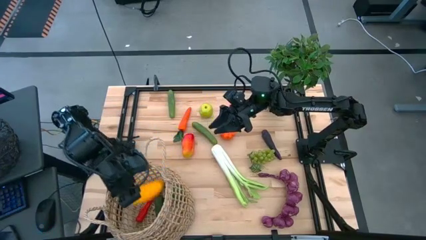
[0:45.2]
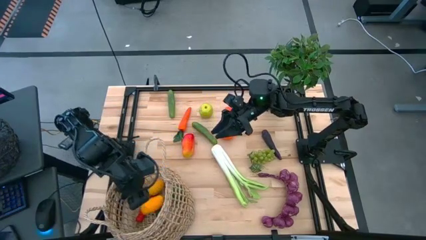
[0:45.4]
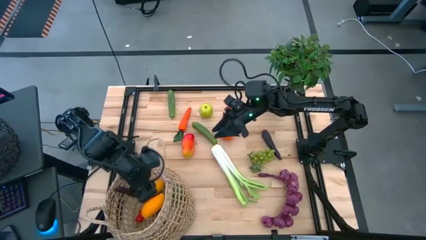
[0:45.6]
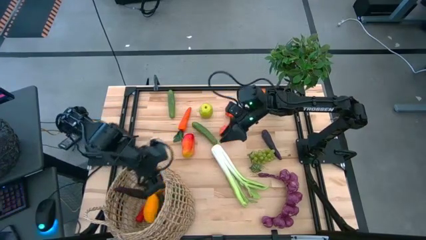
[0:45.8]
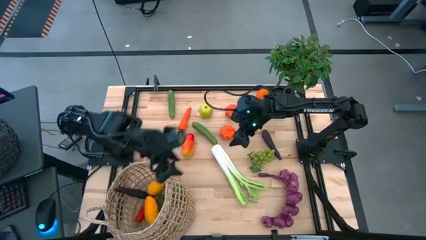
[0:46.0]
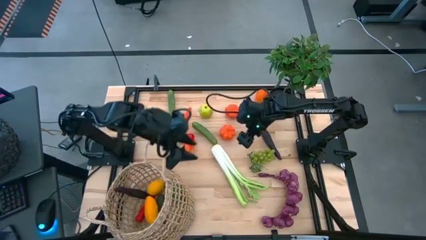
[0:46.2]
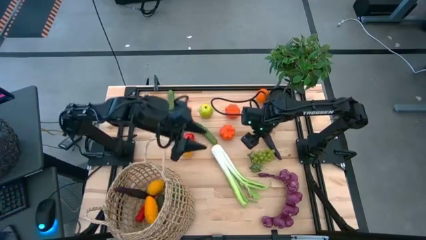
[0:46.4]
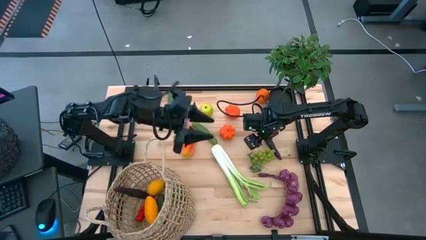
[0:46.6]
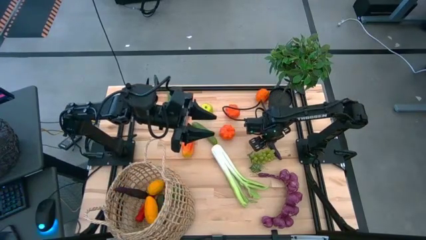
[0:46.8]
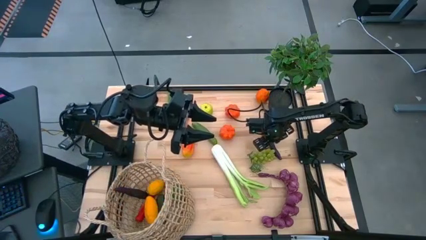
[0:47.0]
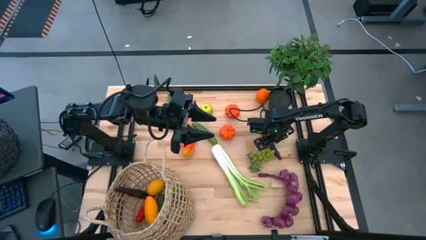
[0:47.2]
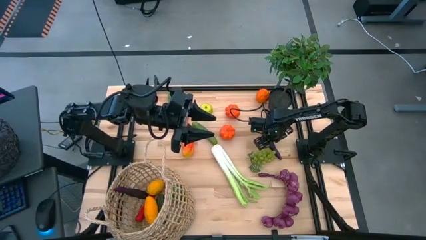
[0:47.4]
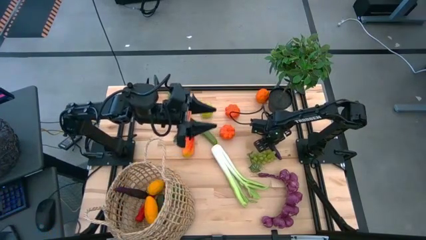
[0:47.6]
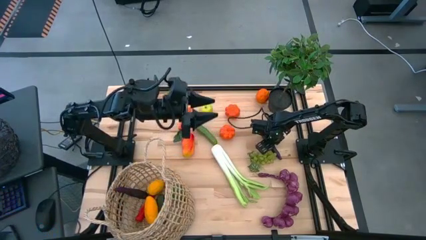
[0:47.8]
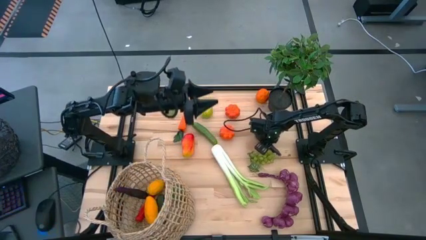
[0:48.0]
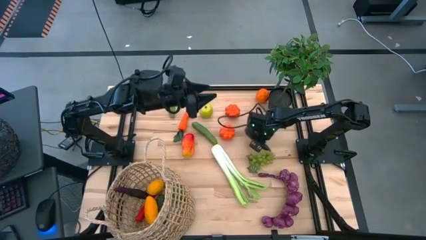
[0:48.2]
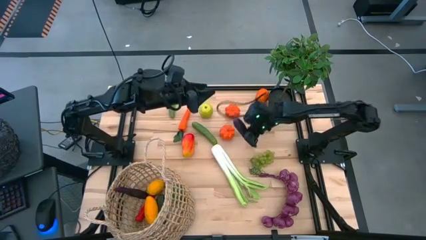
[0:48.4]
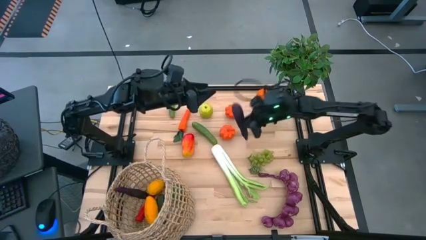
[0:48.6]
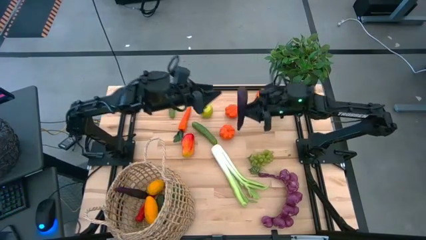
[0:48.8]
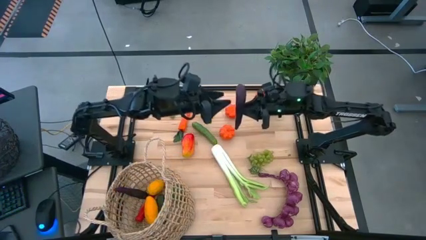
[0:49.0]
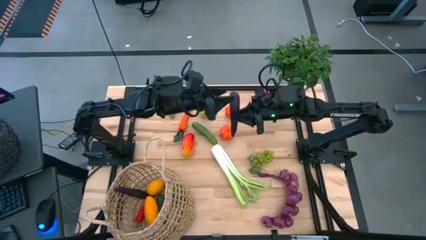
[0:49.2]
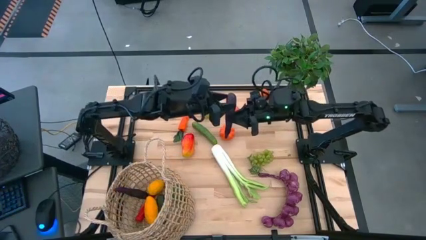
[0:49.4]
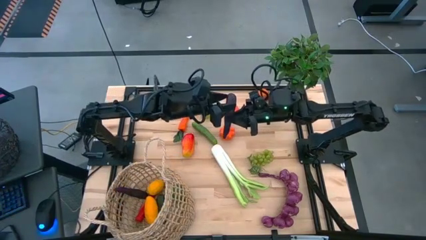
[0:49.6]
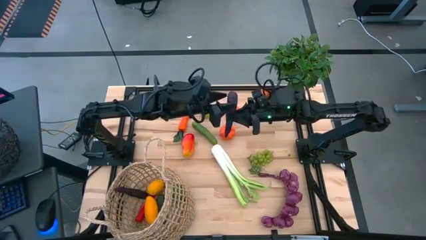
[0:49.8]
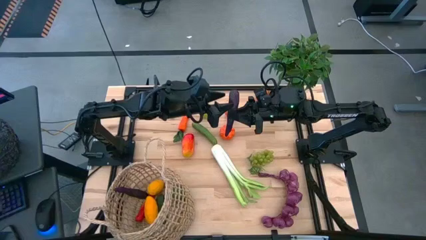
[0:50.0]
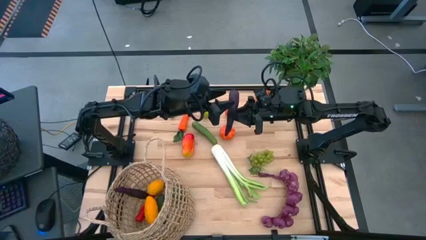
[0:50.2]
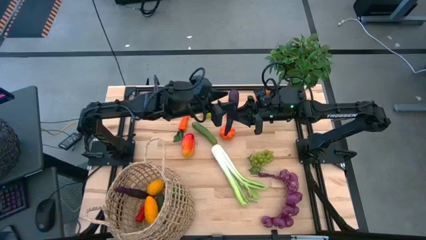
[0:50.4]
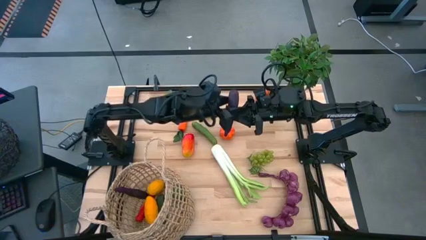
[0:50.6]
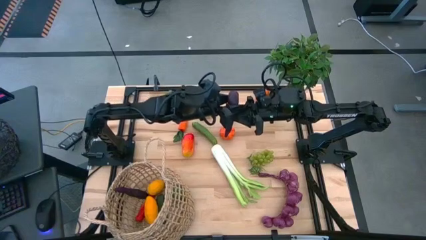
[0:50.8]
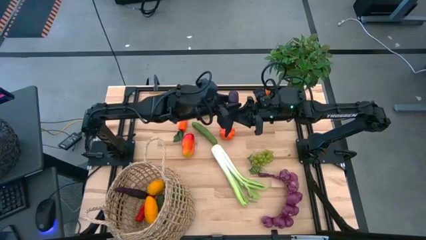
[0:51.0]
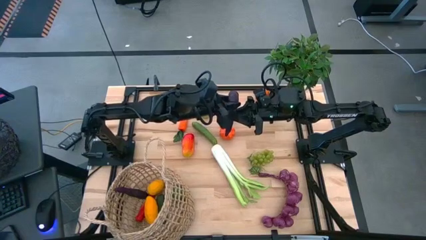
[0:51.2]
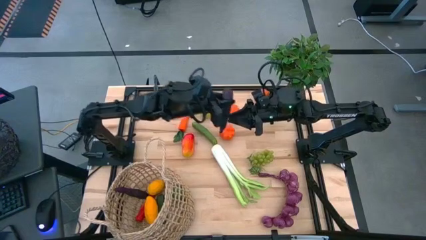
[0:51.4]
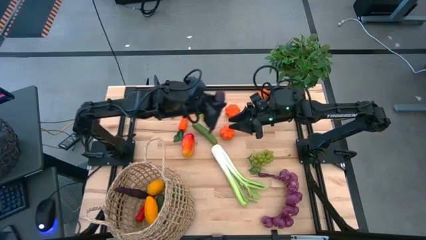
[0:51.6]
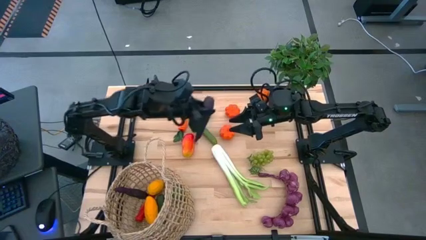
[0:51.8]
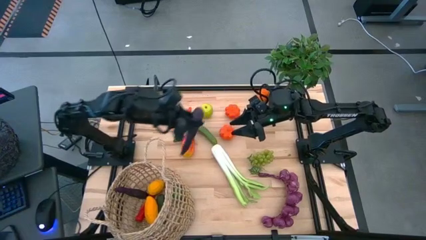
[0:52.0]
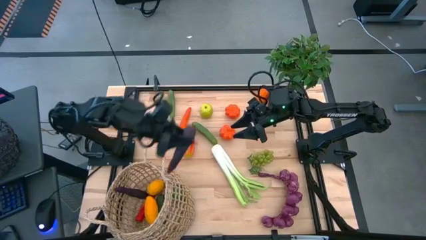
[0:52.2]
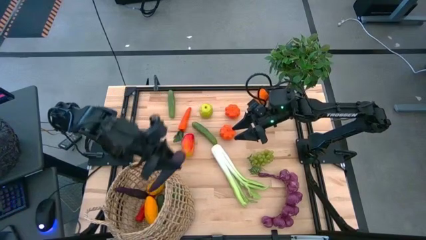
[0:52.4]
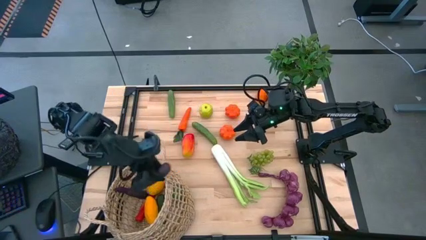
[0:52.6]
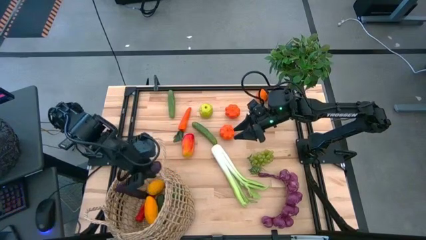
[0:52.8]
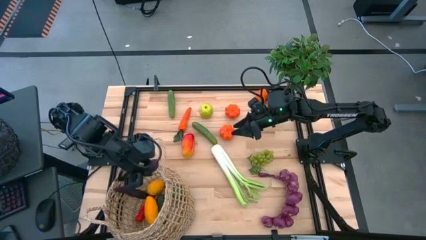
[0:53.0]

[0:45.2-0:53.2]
Task: Build produce basket
Put the eggplant into the basket

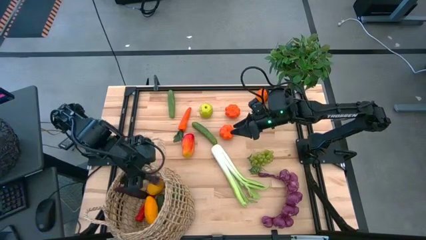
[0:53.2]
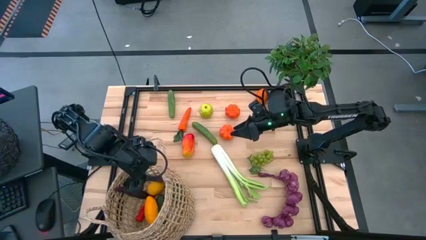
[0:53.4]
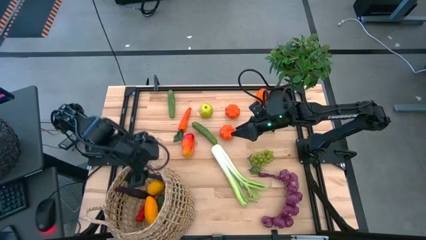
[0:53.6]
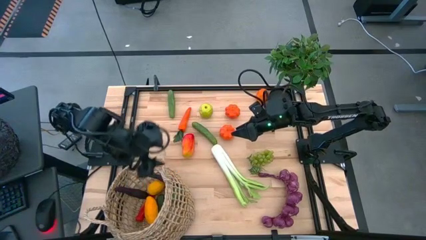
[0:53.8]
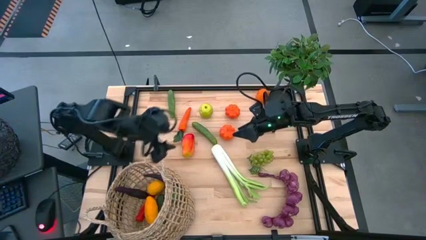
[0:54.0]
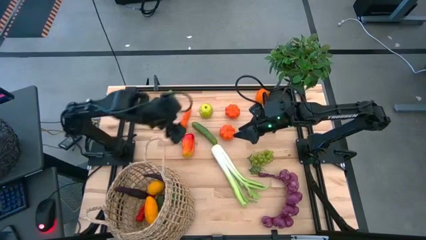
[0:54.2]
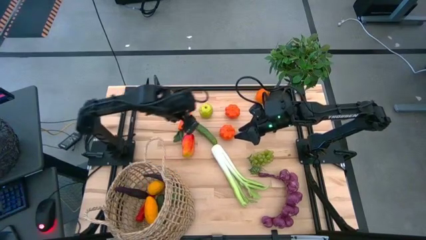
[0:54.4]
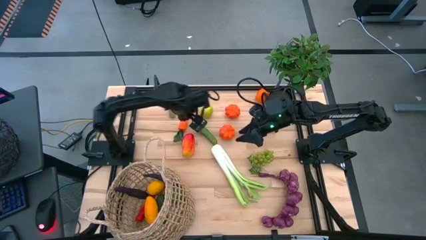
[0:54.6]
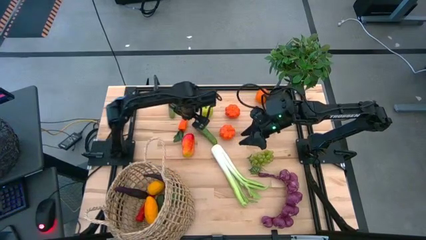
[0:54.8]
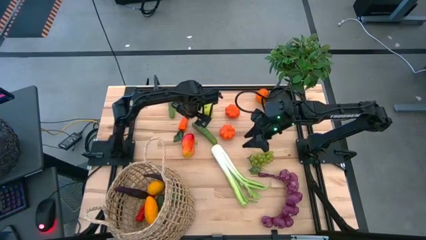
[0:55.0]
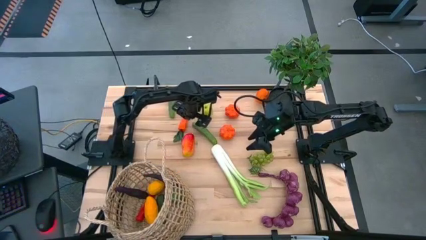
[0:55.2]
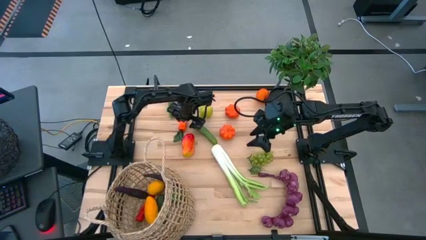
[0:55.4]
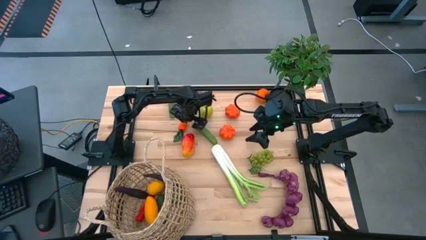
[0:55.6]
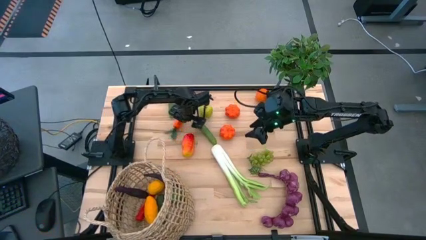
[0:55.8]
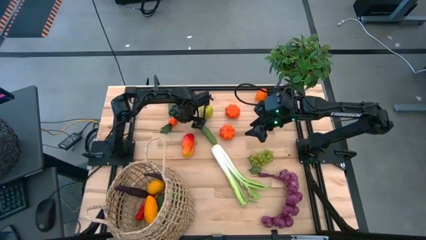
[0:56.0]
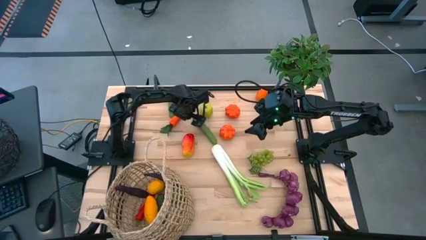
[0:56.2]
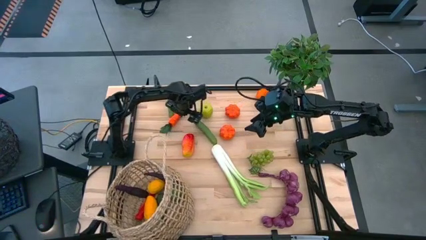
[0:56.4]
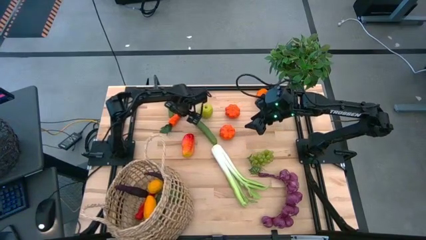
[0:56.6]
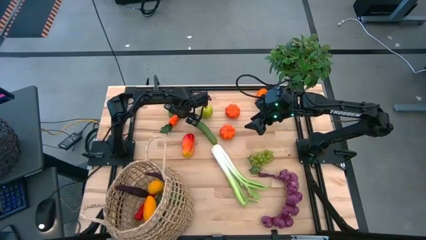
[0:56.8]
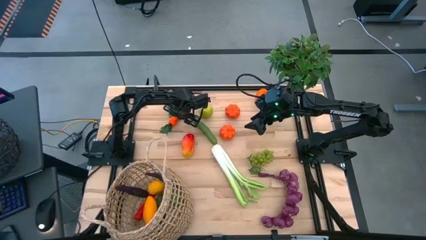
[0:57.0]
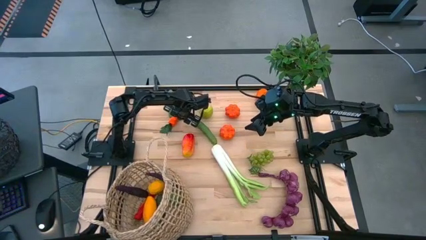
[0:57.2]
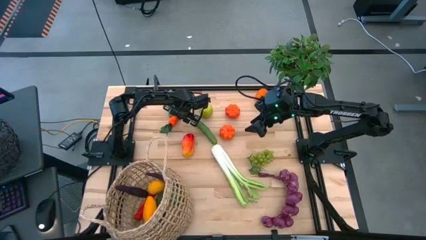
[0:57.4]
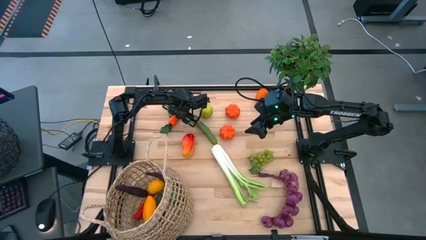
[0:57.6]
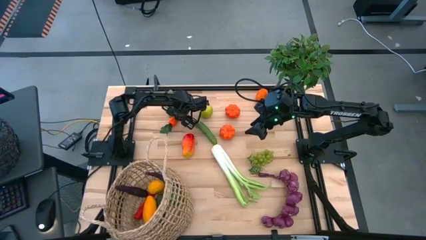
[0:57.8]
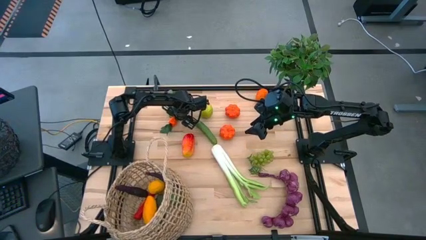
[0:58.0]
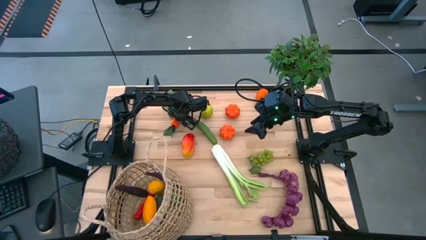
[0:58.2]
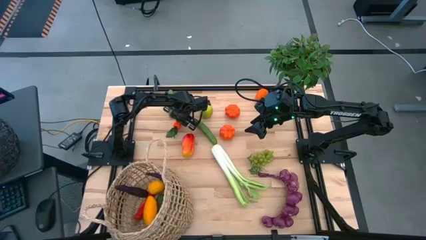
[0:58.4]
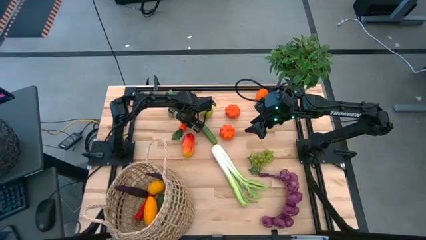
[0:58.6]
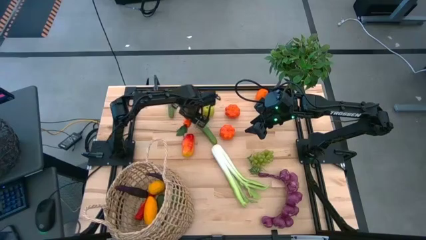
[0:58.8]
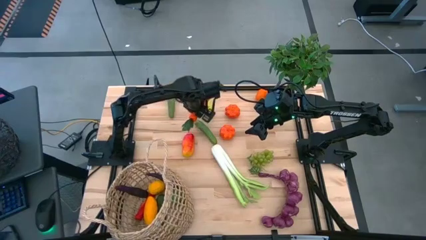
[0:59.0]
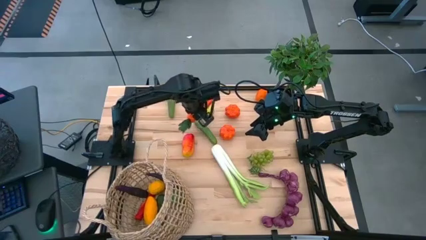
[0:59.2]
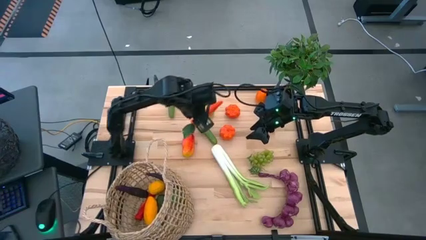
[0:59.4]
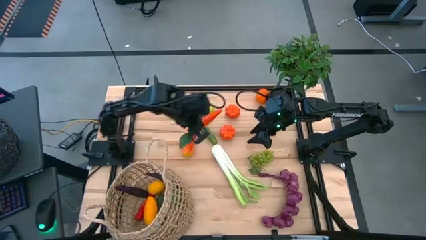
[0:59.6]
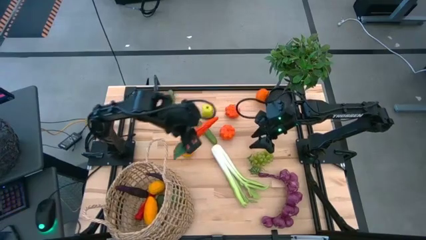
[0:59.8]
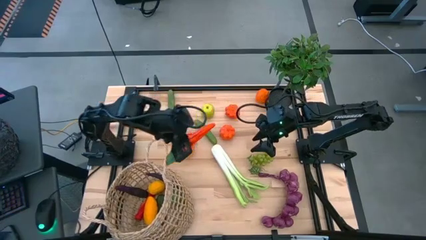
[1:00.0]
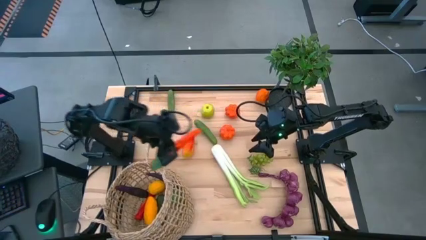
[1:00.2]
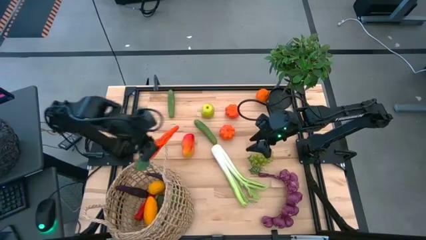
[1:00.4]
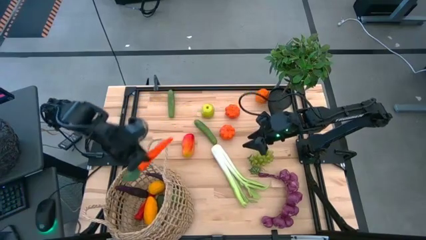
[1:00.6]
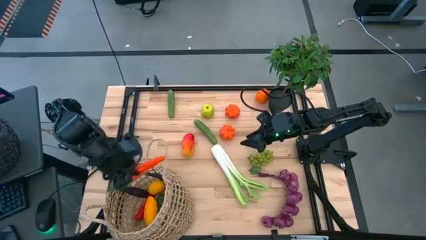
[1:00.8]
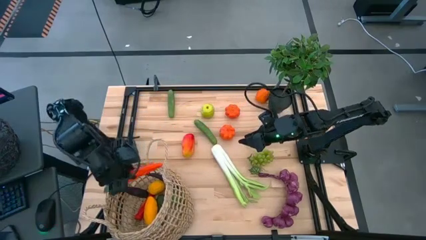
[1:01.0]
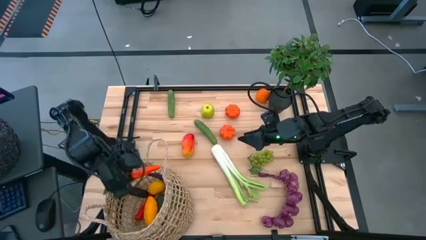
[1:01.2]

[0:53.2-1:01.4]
Put the carrot into the basket

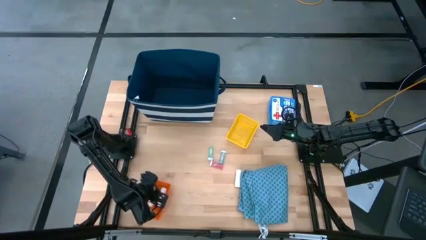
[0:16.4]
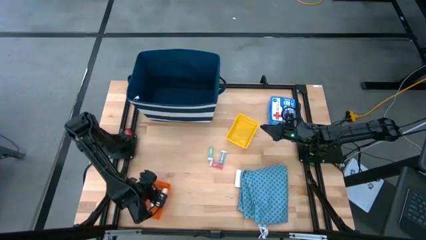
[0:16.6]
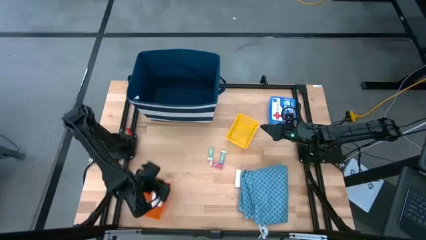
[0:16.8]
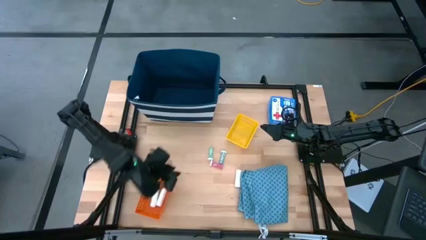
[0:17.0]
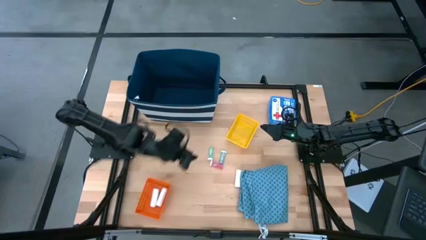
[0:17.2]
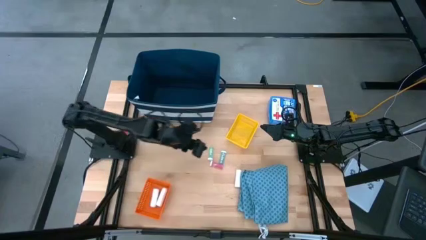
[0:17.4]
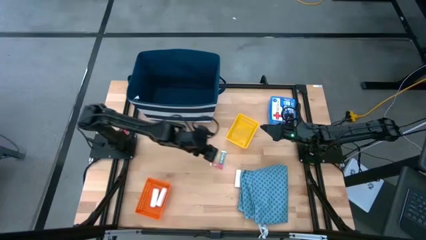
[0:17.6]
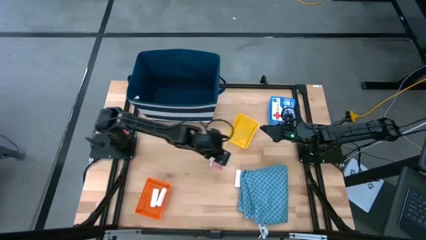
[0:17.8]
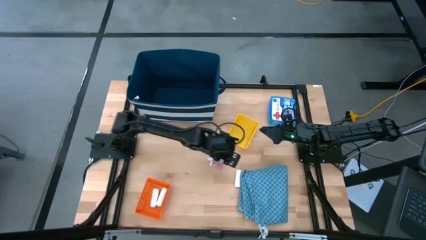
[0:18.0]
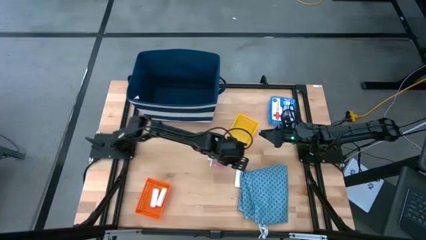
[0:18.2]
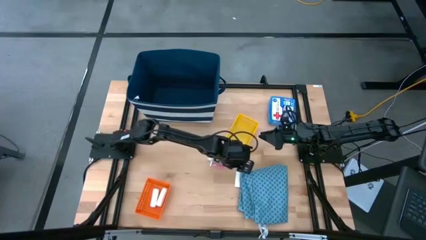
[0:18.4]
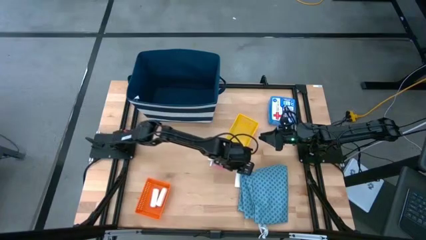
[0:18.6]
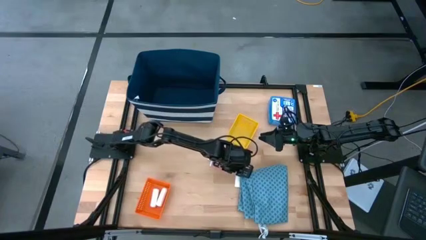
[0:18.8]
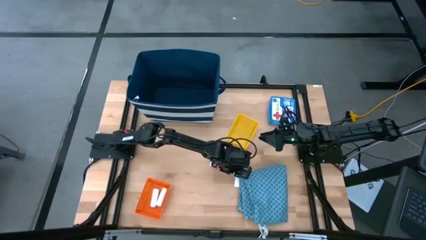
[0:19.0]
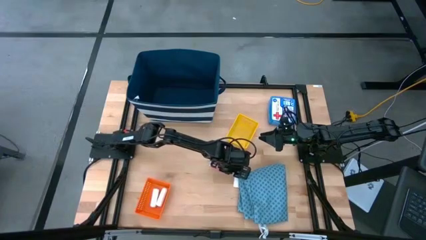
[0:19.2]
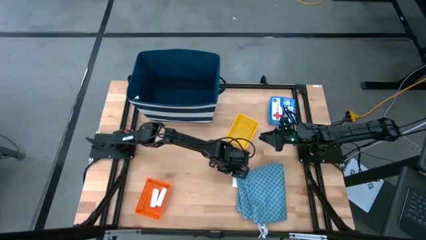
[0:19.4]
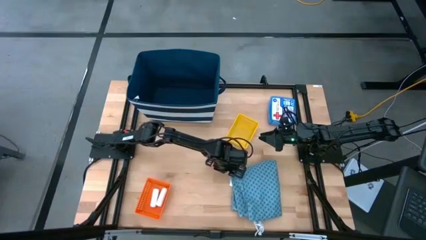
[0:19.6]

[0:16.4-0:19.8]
Task: Pick & place medical supplies in basket/bin
Put the white gauze in the orange bin
